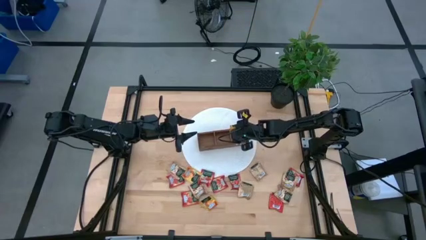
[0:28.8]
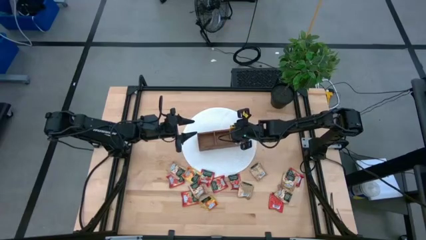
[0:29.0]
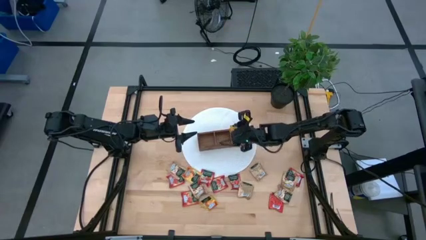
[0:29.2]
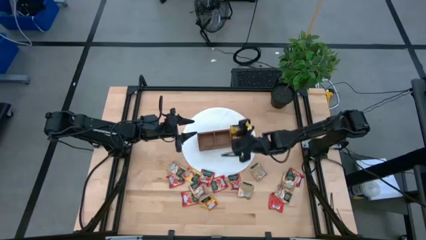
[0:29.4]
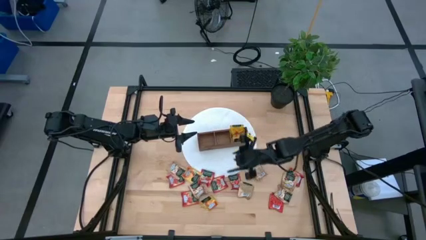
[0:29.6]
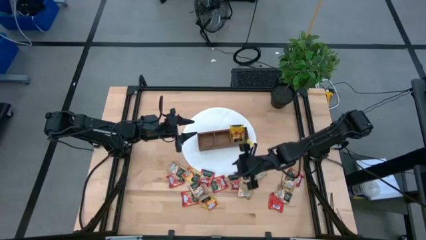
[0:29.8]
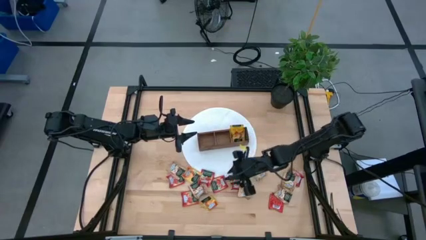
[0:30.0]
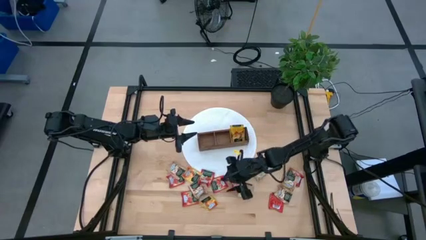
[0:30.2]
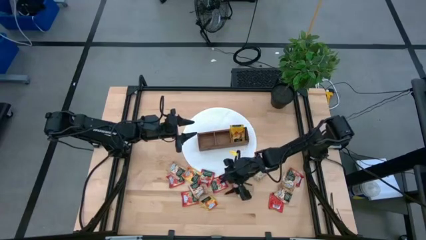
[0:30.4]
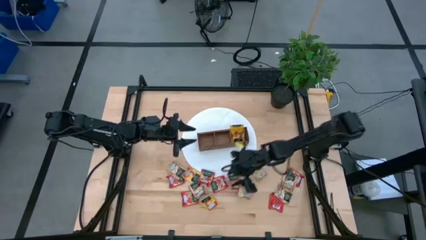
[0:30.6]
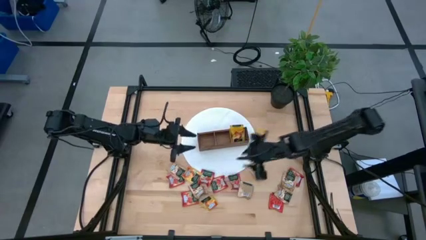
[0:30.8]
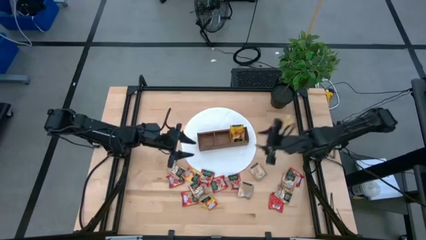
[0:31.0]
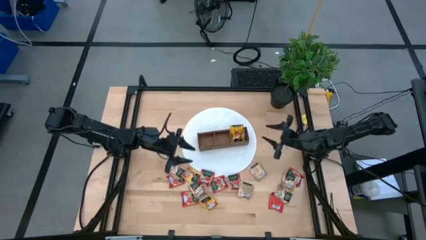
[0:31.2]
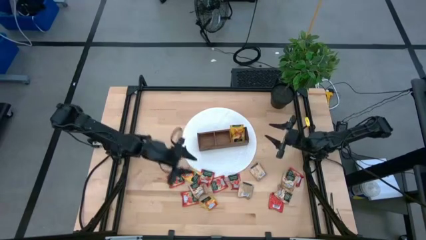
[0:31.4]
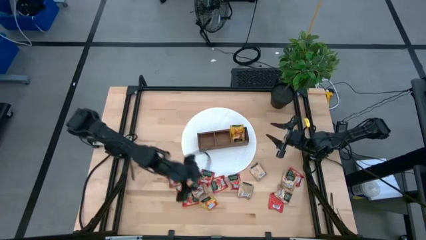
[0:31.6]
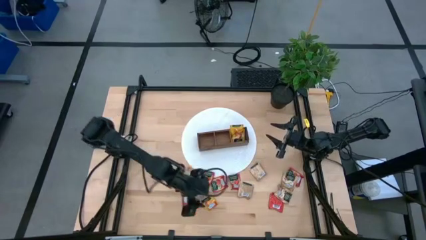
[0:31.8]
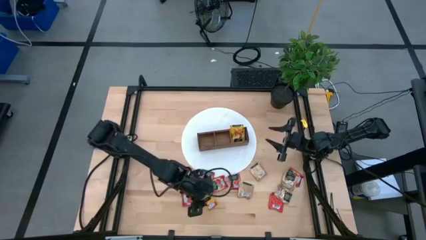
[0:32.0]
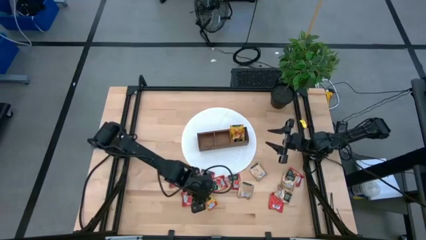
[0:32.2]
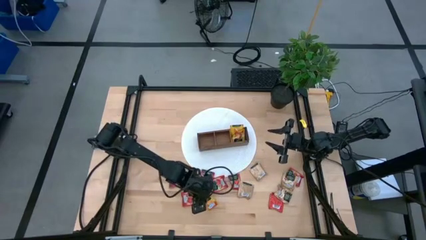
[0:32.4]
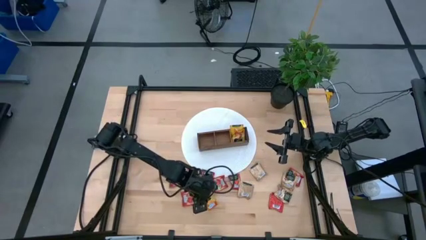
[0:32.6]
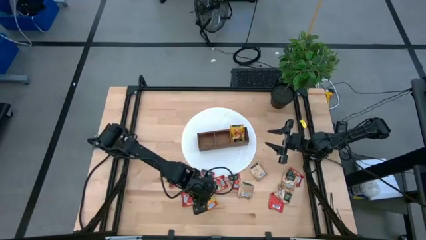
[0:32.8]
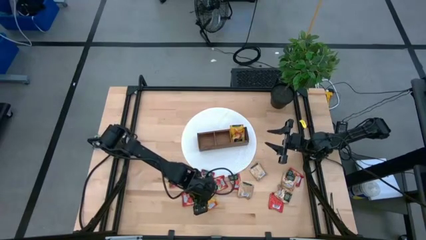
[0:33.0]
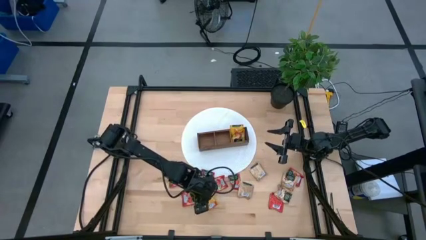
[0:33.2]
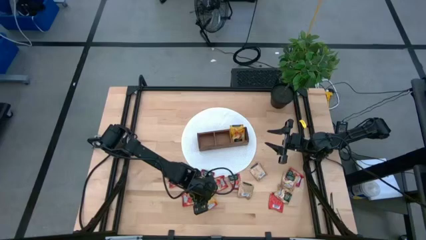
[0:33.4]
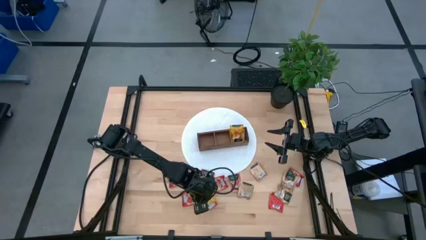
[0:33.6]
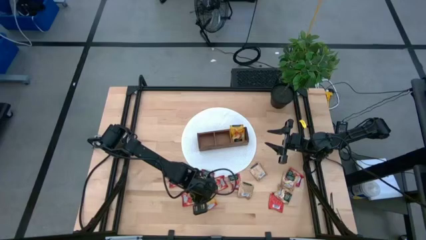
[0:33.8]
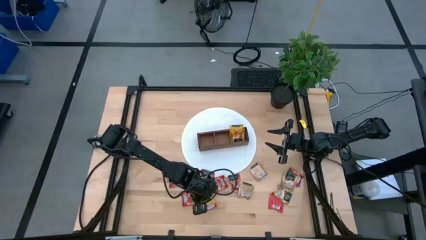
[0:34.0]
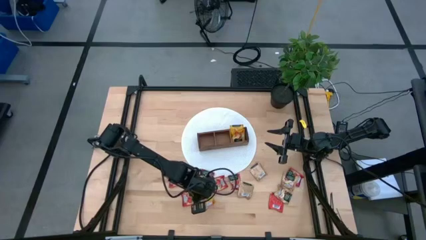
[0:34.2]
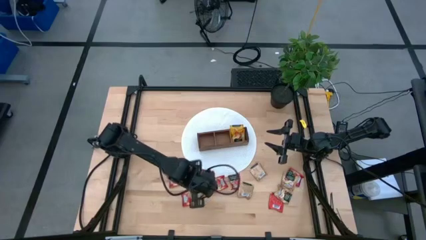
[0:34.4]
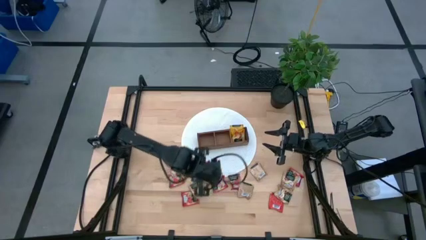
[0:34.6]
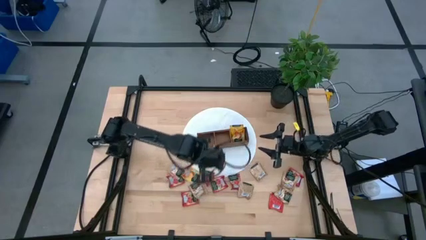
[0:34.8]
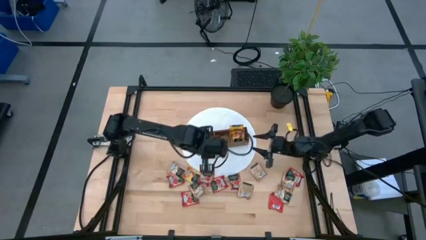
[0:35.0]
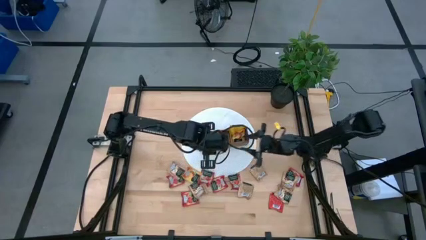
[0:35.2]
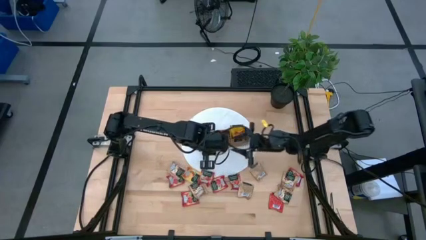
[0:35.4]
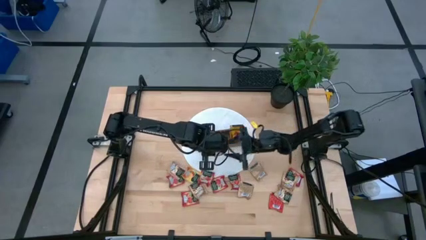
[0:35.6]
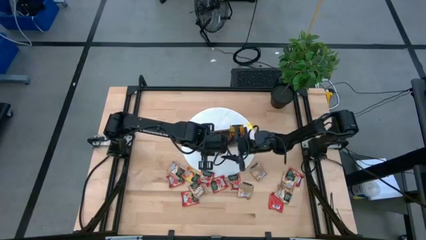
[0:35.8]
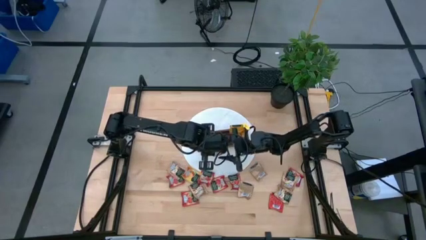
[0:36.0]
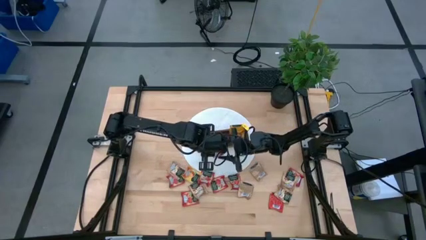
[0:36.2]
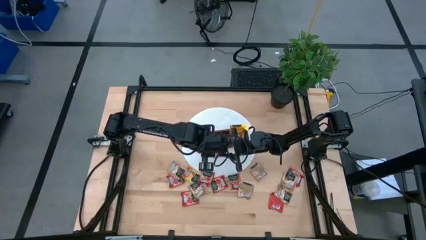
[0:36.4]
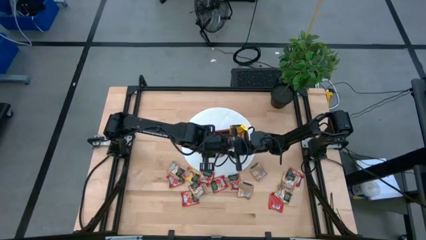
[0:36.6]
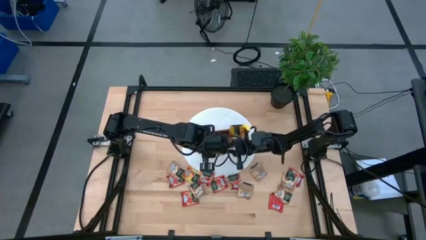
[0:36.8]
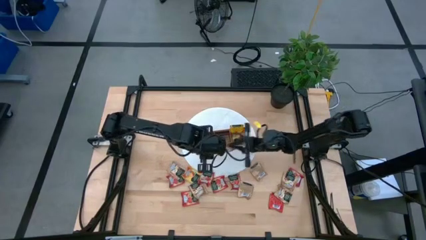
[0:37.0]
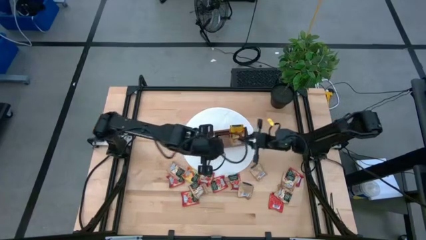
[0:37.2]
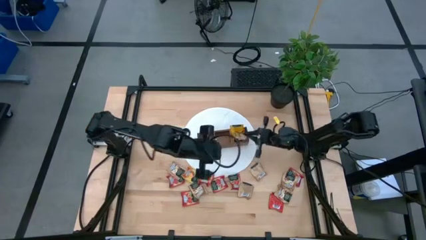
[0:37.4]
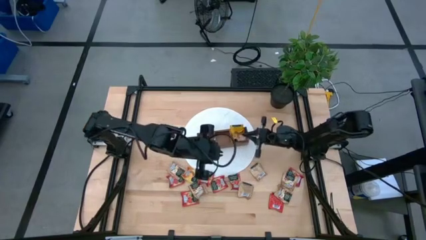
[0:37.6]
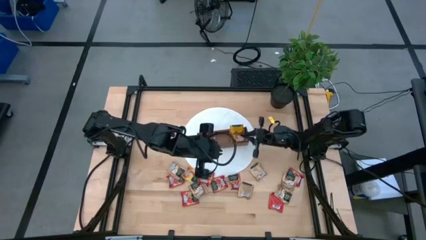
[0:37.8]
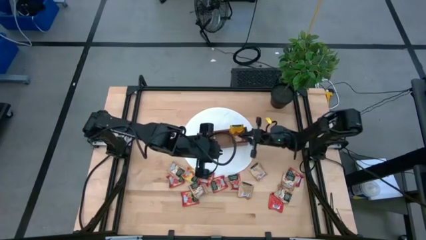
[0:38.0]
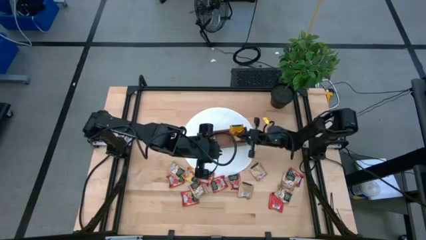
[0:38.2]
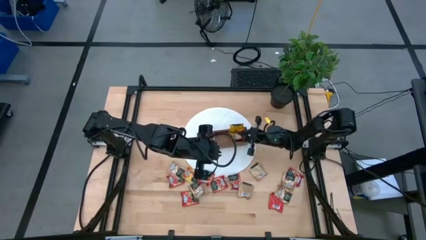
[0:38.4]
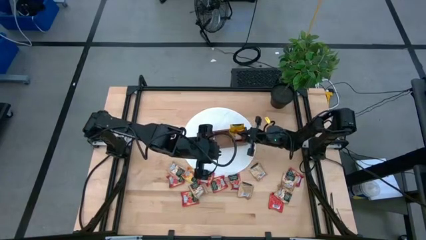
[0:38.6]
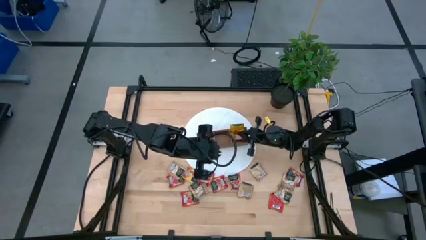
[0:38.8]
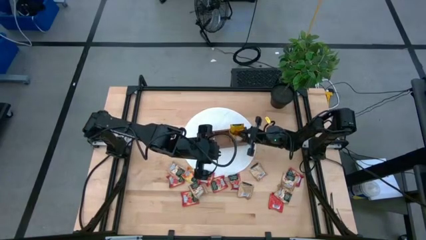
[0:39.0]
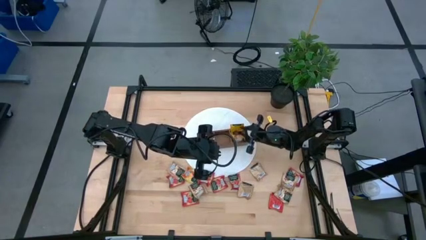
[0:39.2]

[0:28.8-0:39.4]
Task: Pick & Place Tea
Put the yellow tea bag into the right section of the wooden organizer

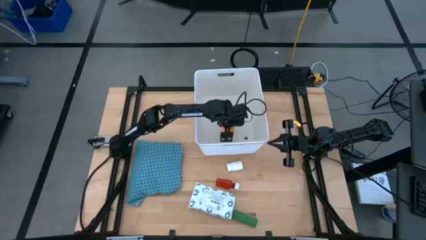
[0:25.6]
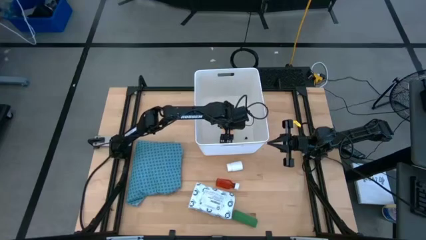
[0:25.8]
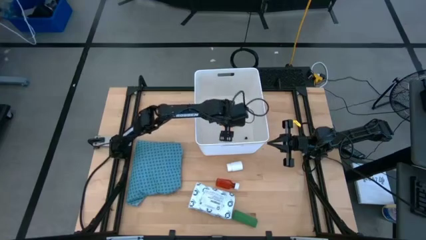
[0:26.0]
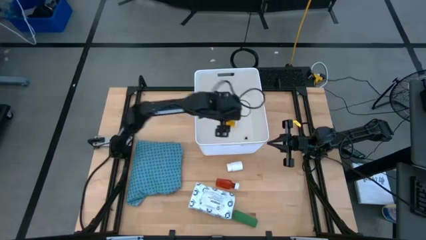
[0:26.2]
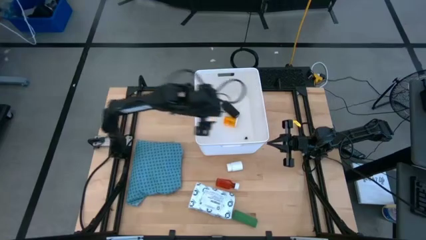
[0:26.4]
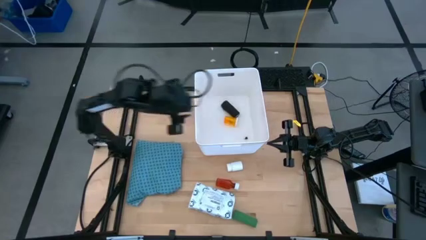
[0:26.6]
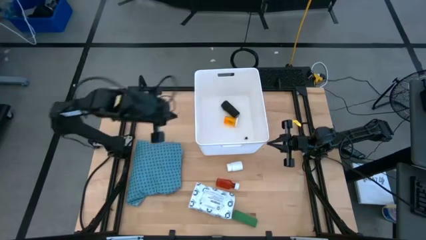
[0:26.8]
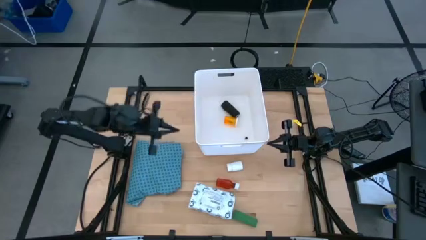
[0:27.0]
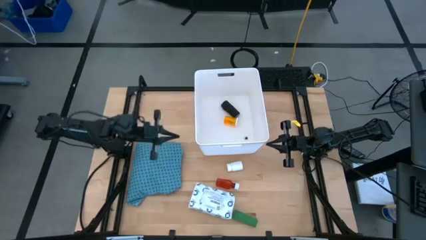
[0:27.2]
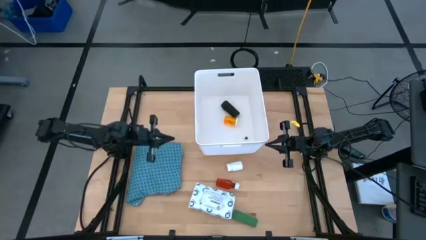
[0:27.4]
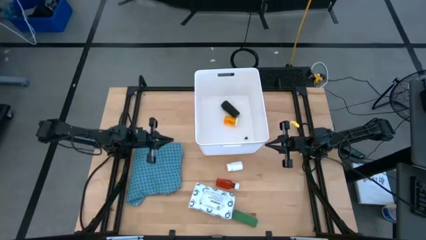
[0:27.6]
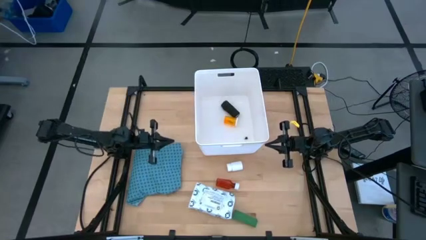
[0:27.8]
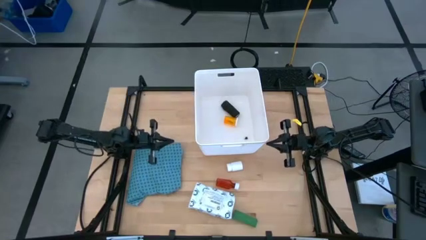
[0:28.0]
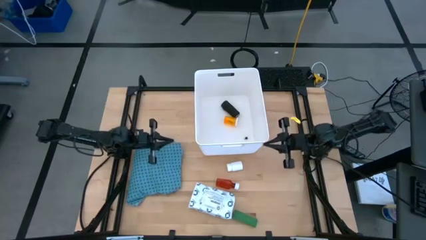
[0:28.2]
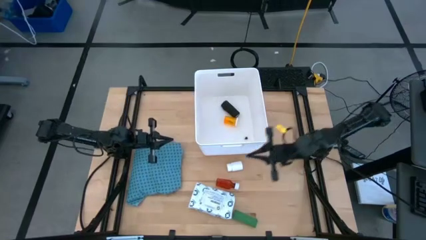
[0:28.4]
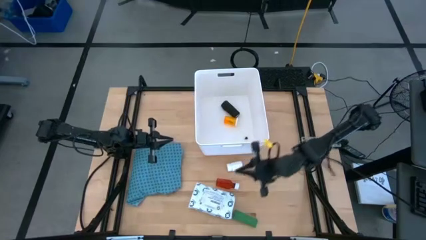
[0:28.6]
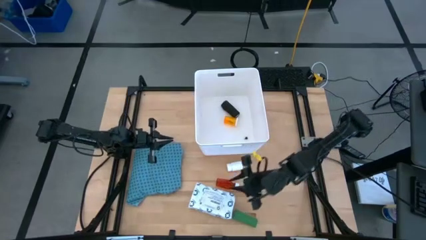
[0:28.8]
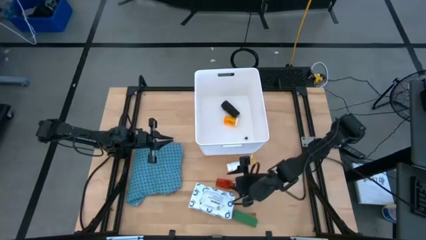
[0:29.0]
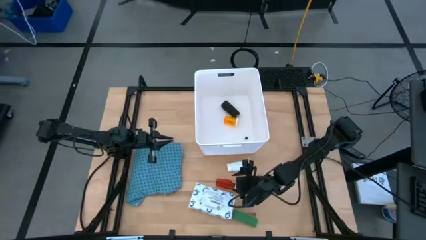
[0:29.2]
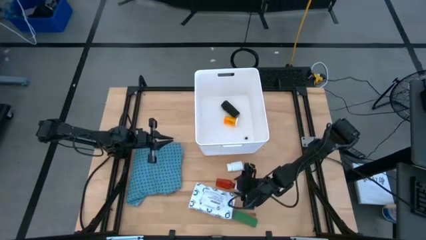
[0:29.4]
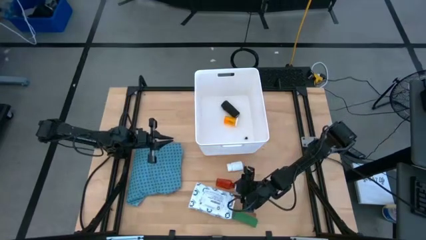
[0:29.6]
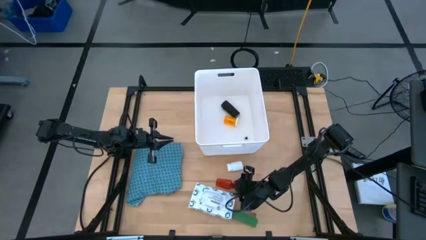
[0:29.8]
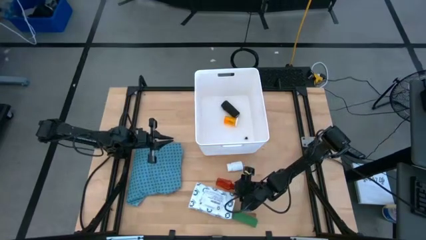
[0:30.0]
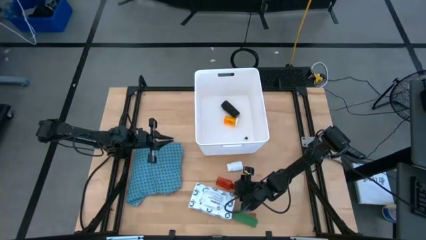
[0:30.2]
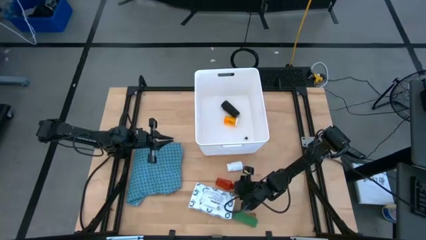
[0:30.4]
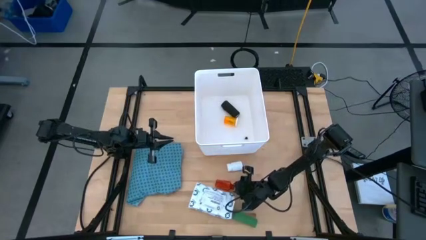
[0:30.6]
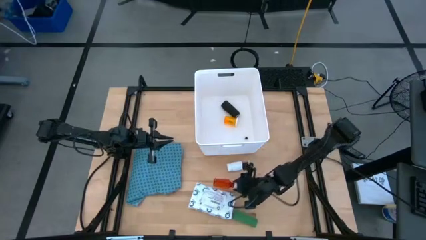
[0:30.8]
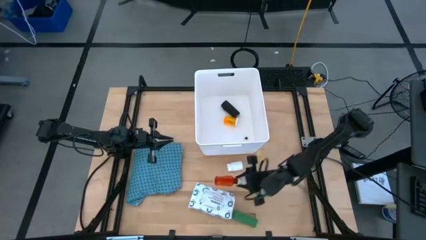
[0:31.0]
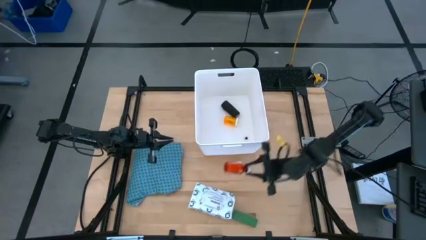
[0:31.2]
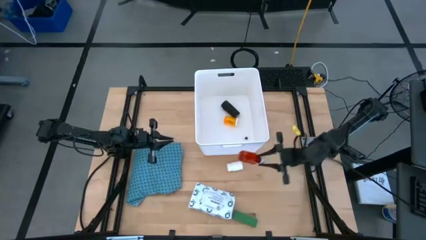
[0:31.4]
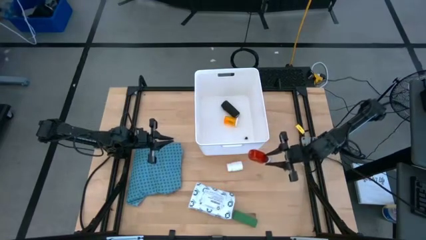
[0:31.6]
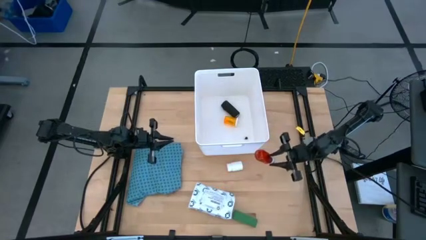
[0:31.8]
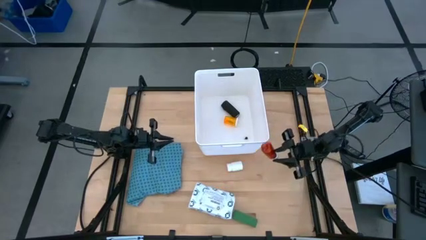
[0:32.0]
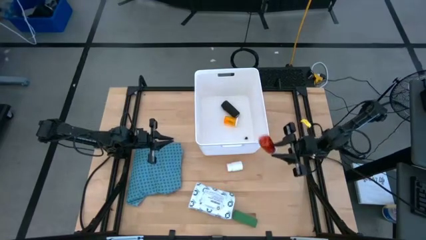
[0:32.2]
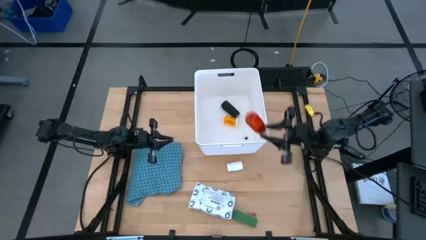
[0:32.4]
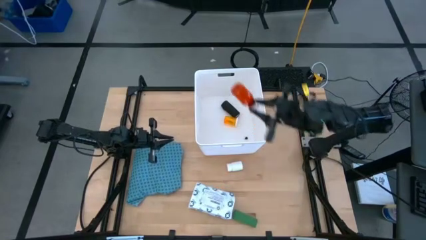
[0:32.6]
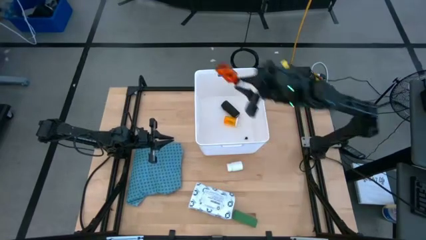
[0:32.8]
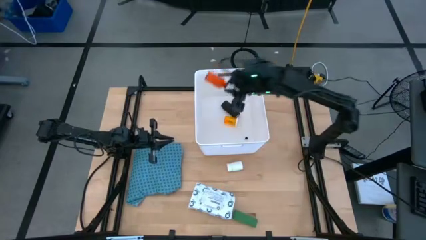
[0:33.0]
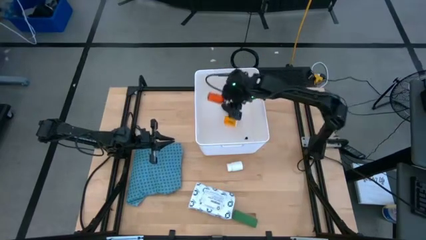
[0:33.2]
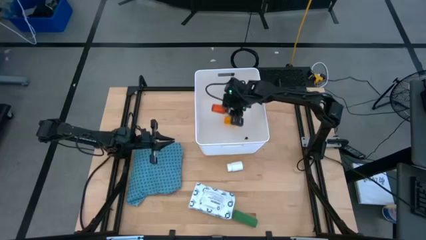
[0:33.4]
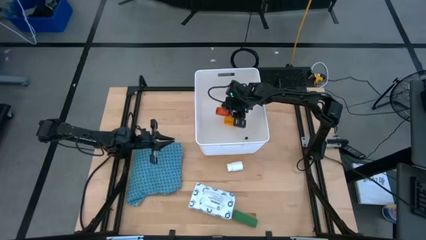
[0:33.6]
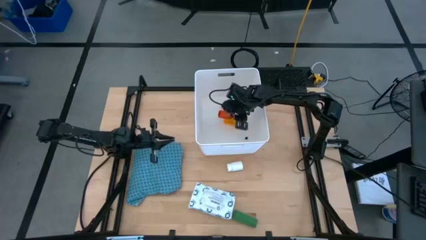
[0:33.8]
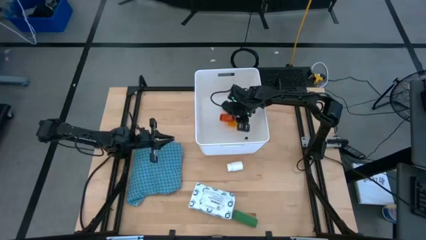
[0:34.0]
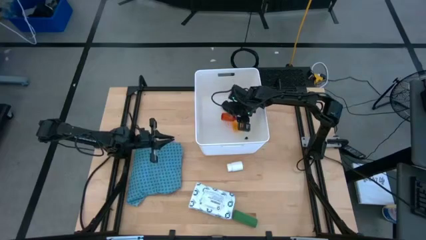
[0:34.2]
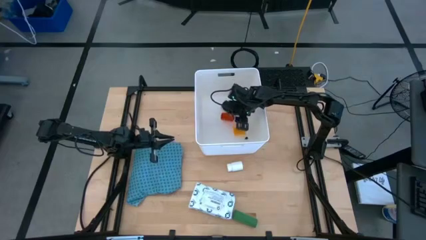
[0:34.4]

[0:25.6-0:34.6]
Task: Pick & place medical supplies in basket/bin
Put the small orange bottle in the white basket
